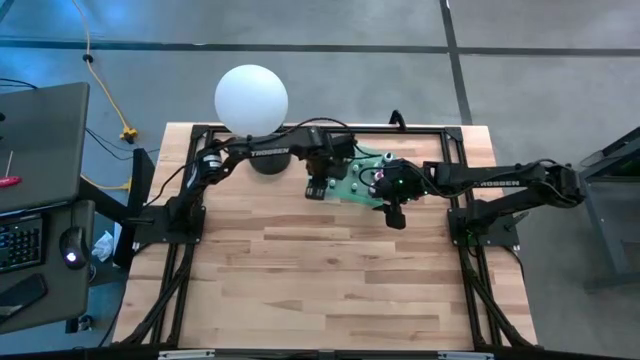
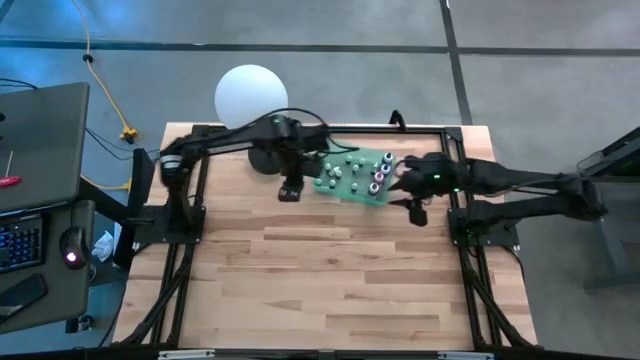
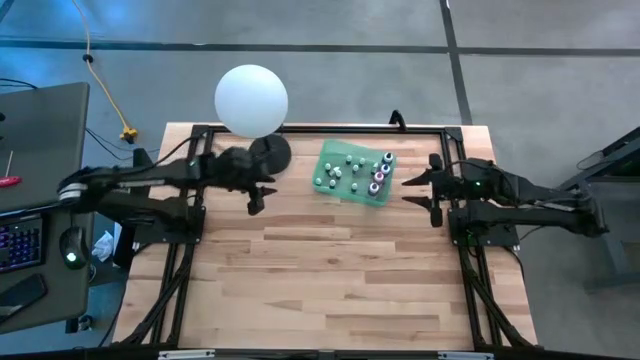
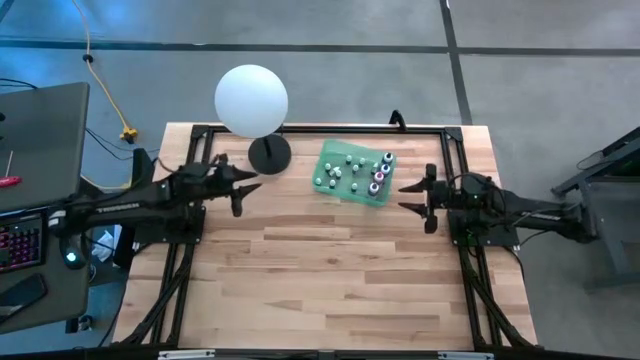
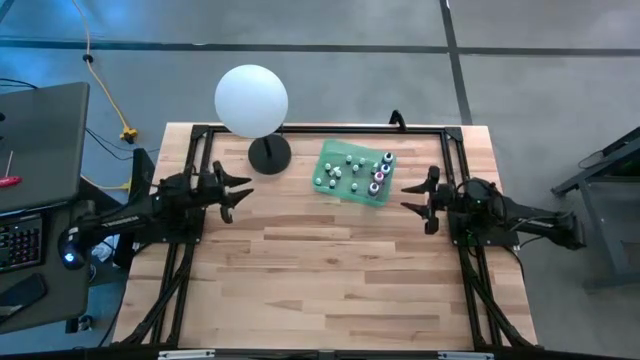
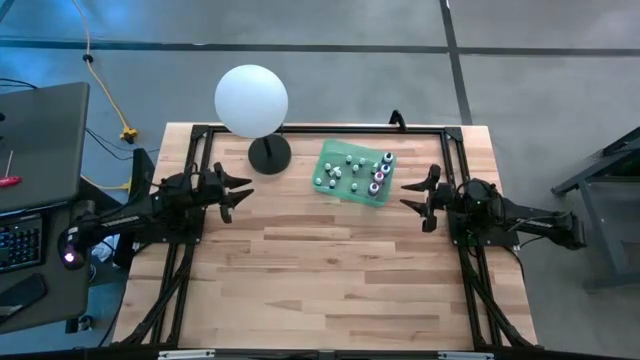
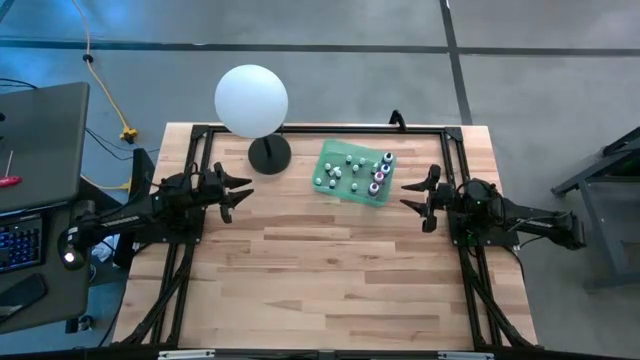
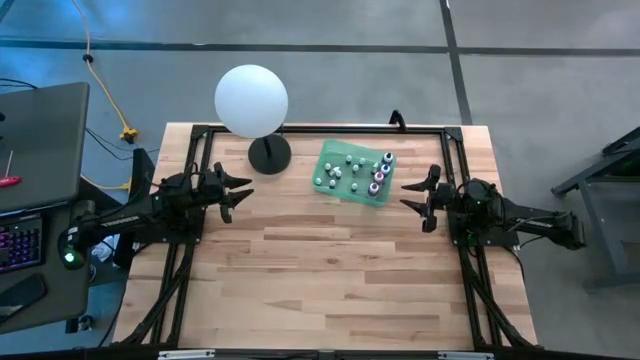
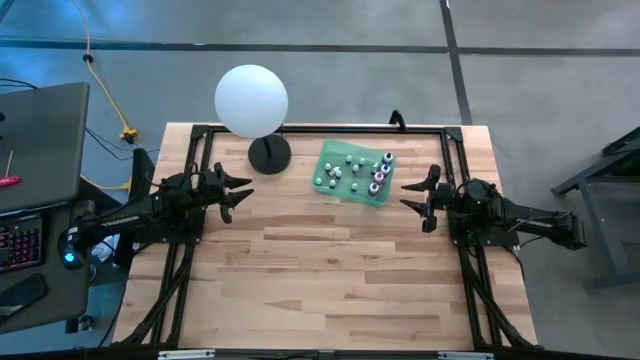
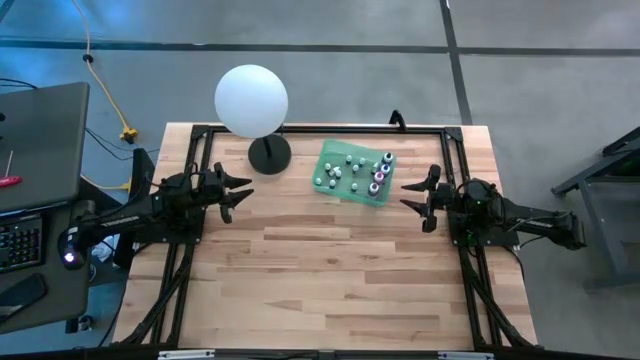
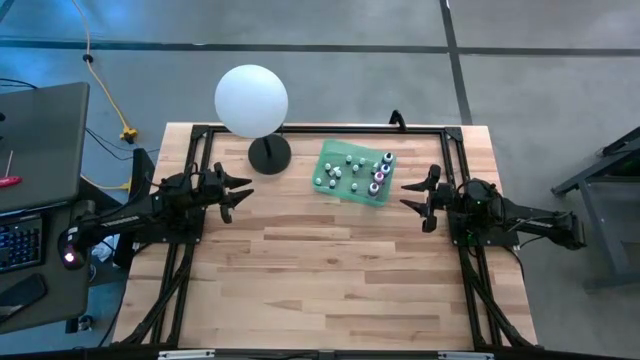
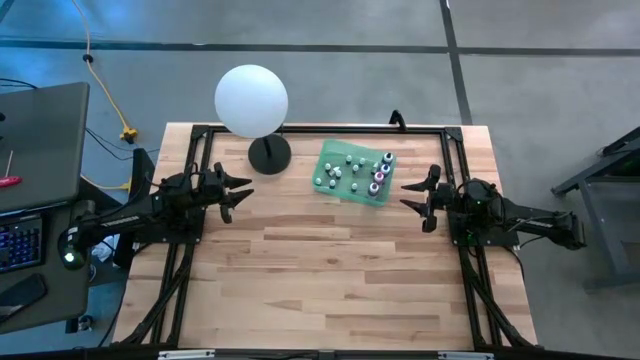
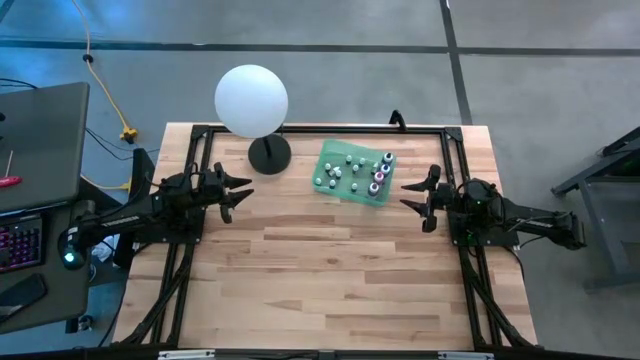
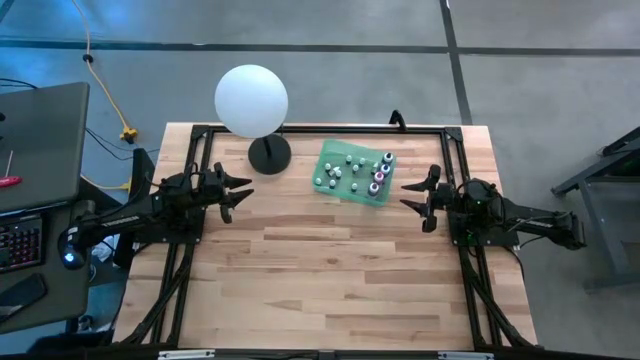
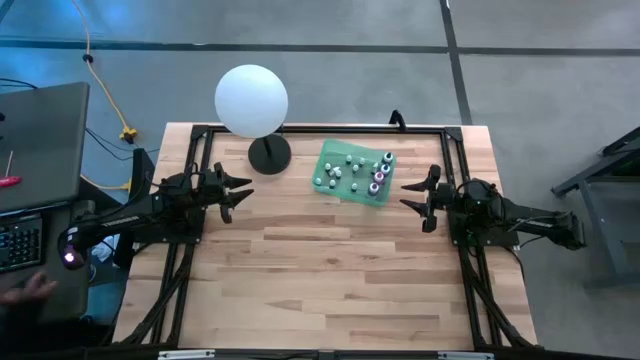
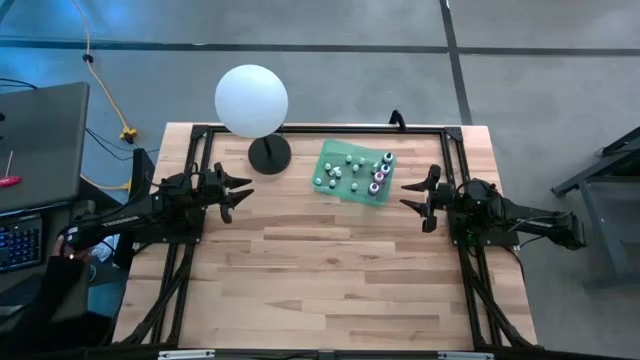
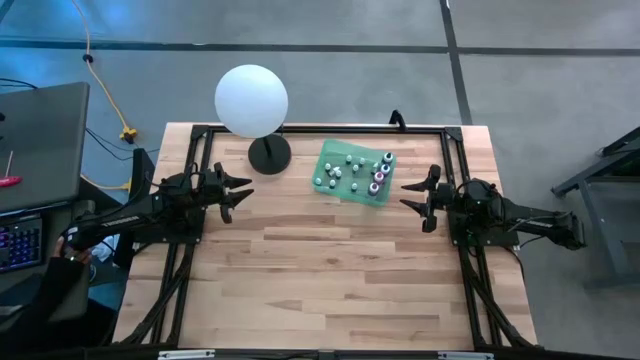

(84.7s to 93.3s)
Task: Pick & Place food coloring
Return to Home Position

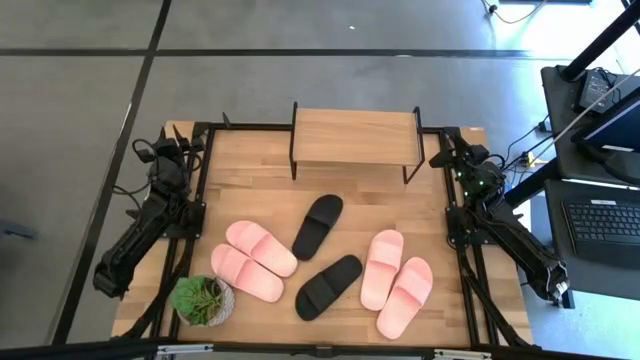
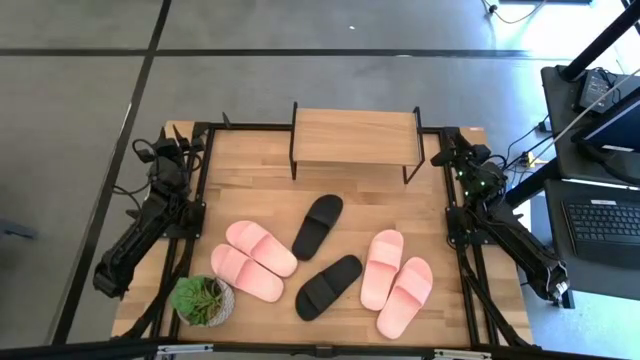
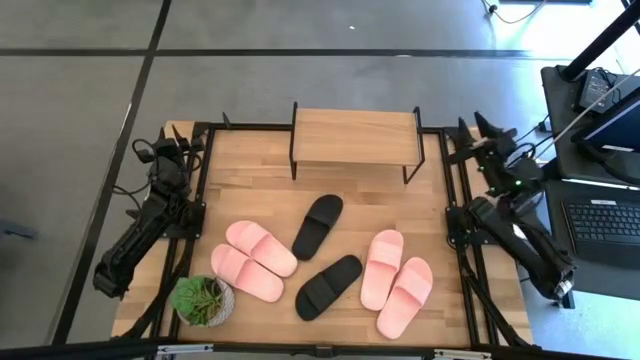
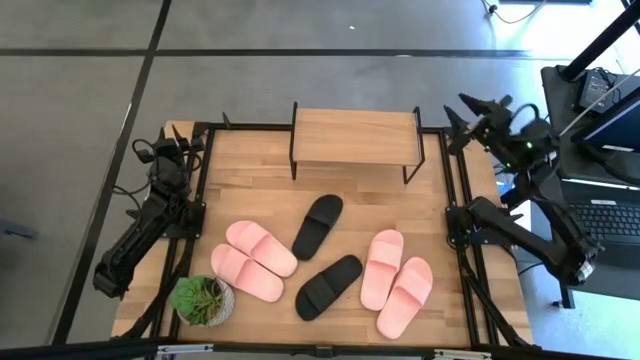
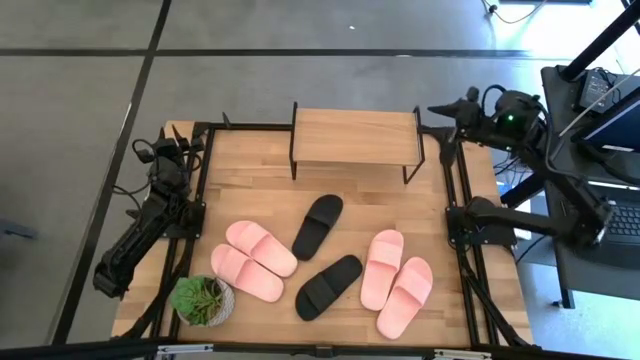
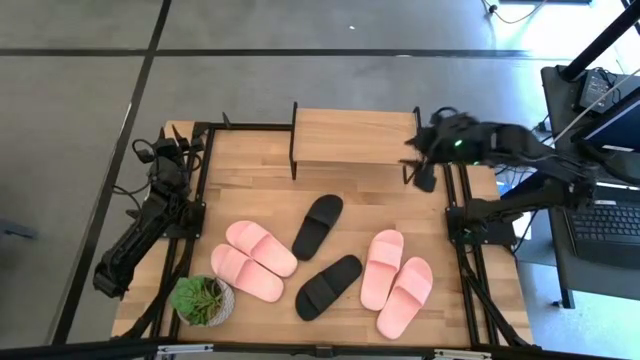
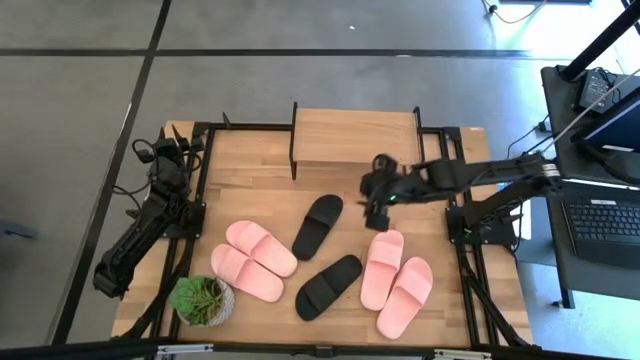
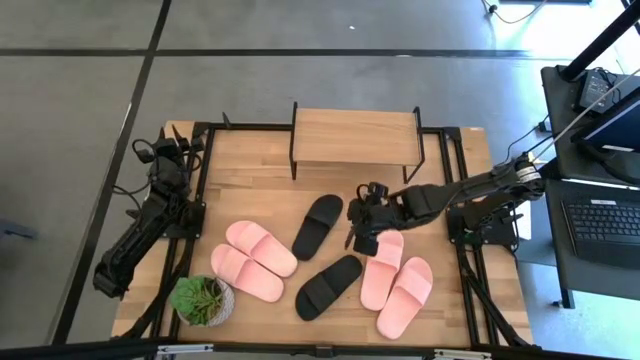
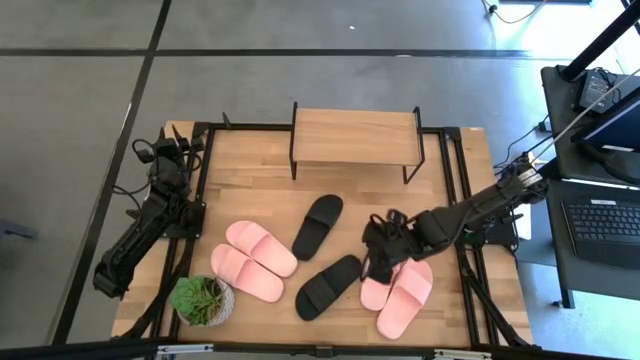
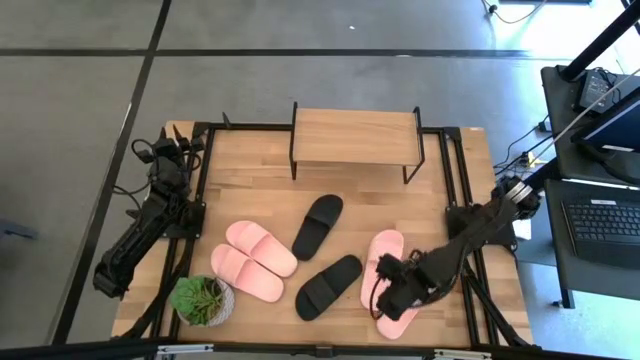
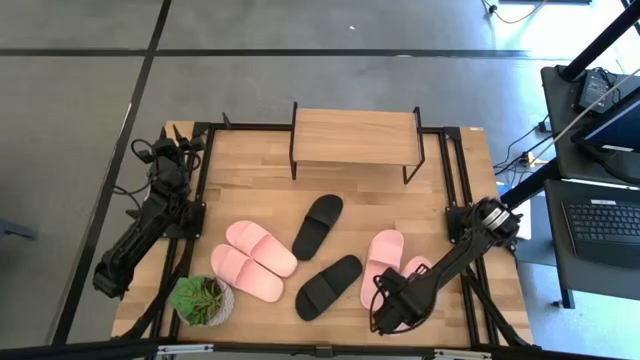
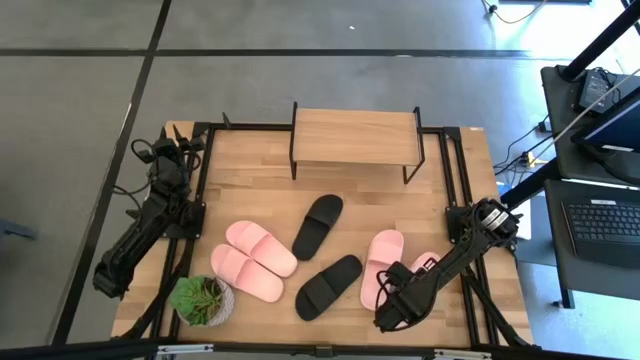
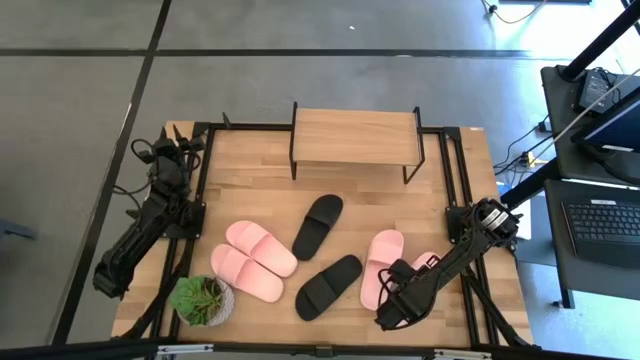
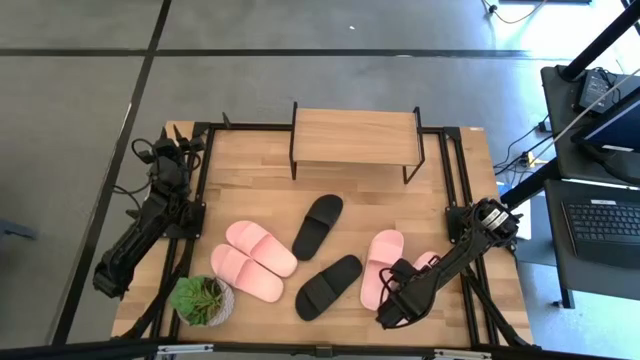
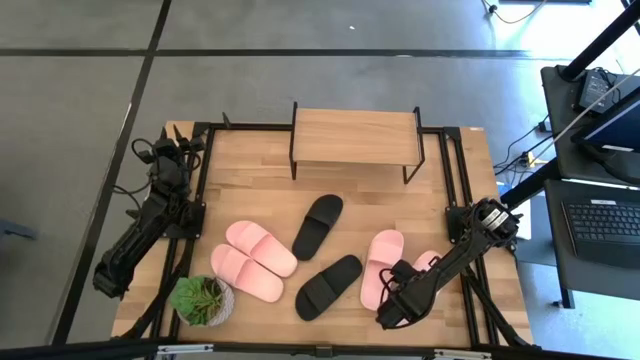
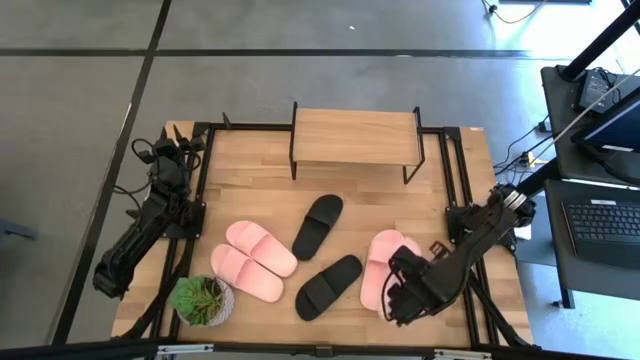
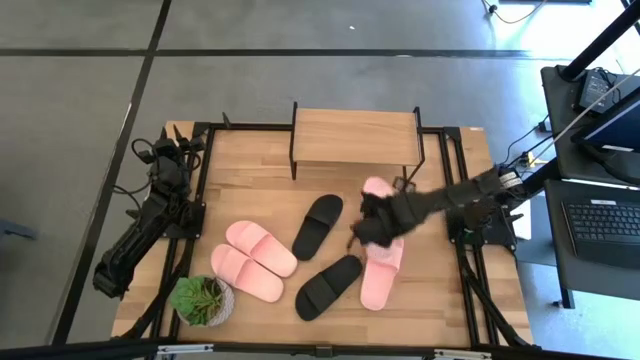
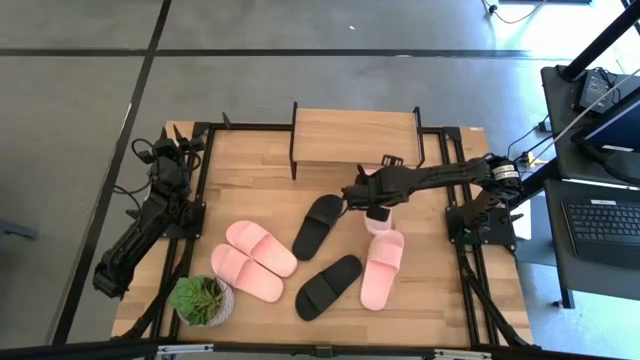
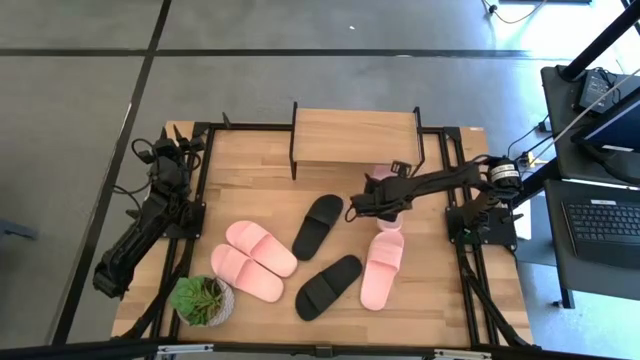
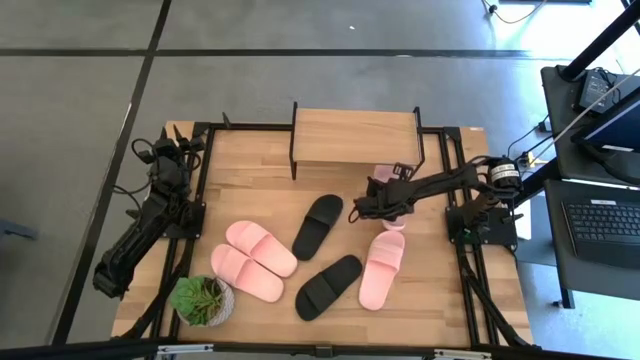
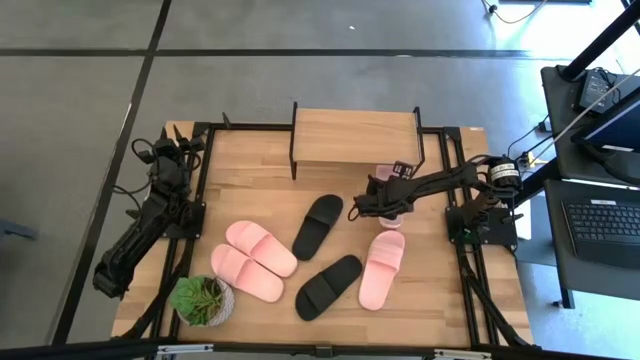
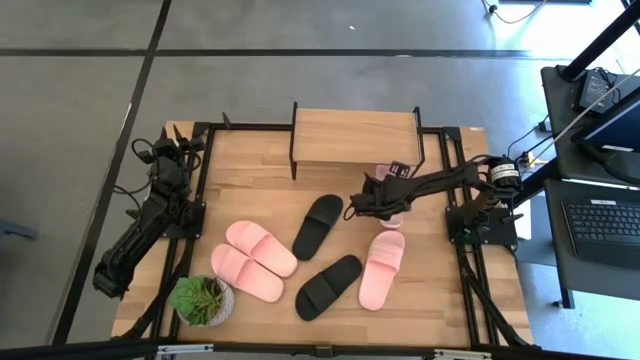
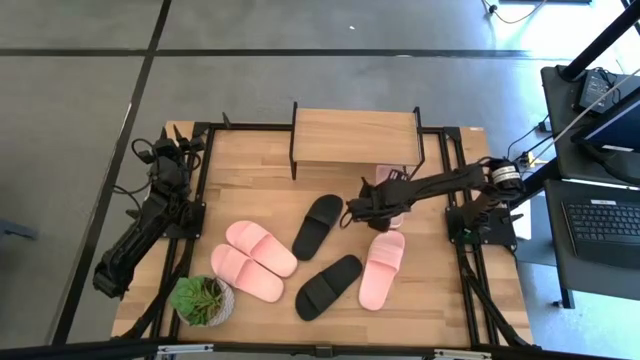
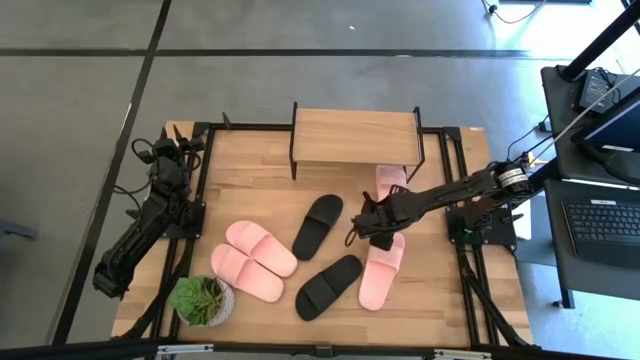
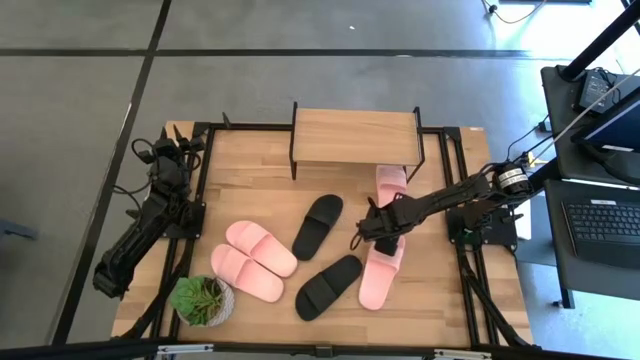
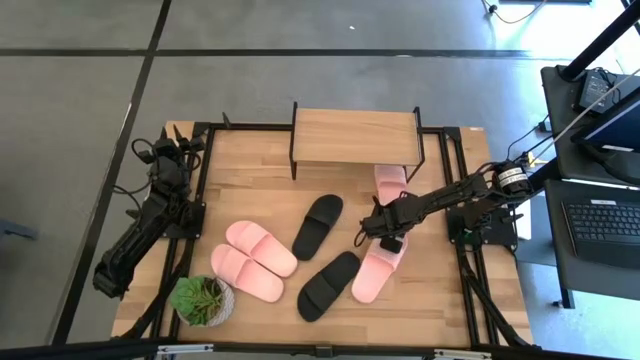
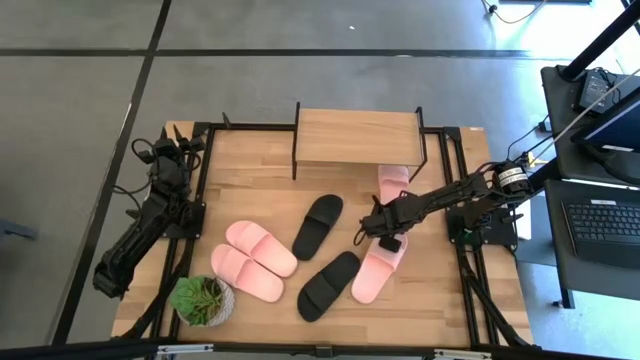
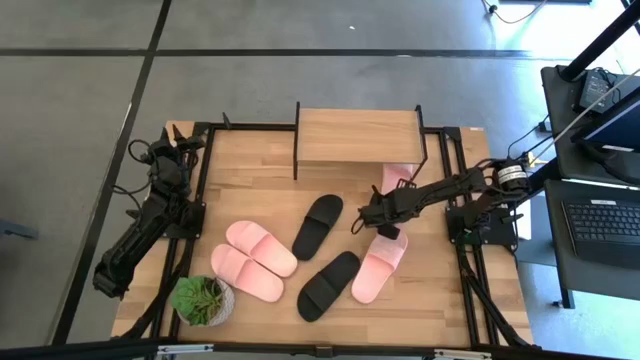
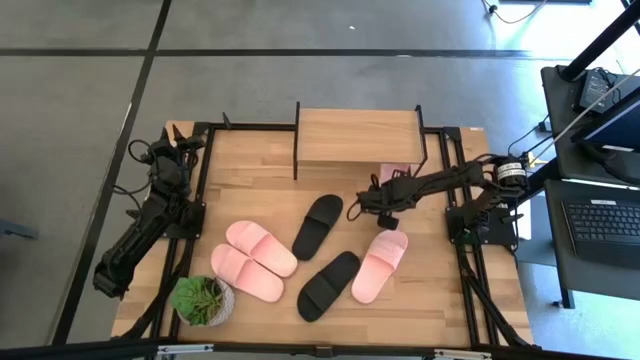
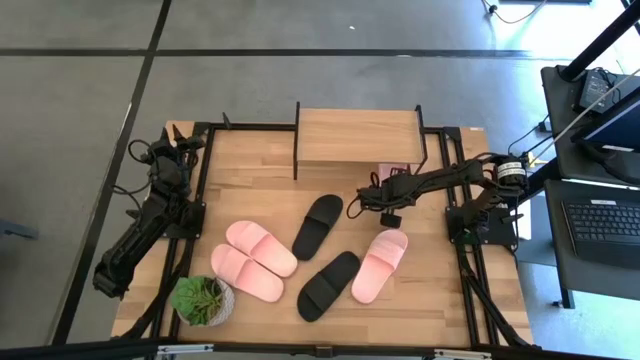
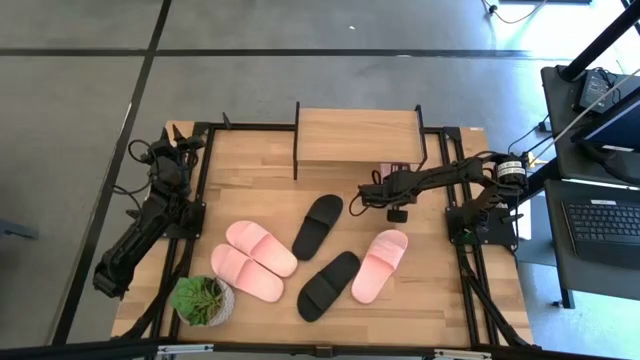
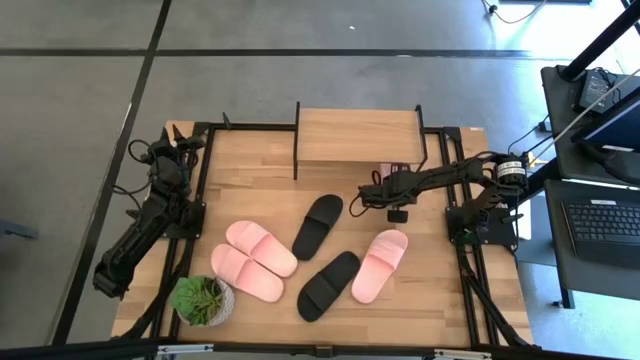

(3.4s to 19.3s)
Task: Pick and place slides into the shelf
Put the pink slipper under the shelf
